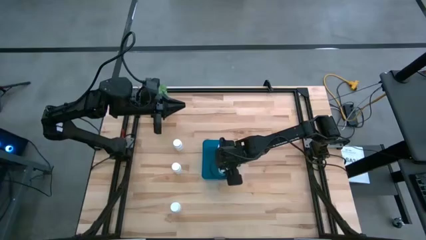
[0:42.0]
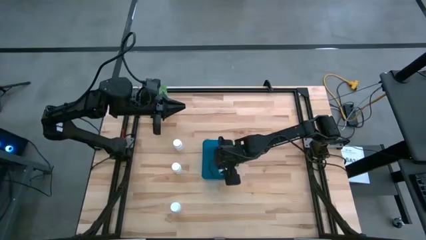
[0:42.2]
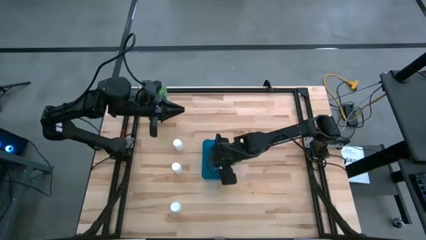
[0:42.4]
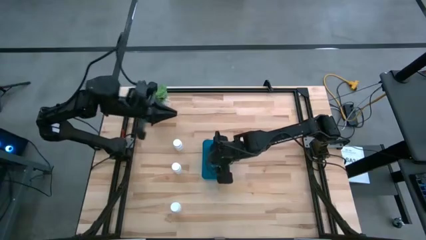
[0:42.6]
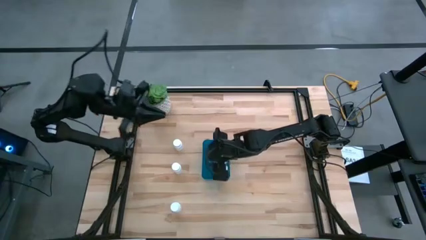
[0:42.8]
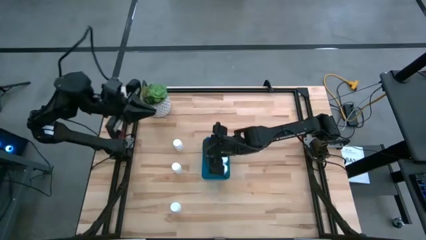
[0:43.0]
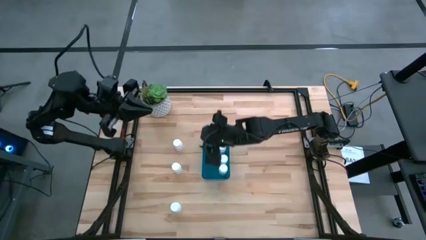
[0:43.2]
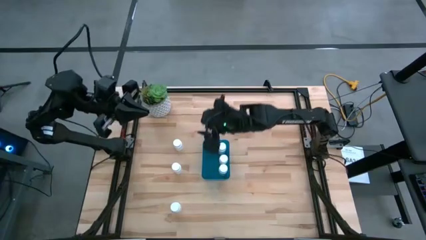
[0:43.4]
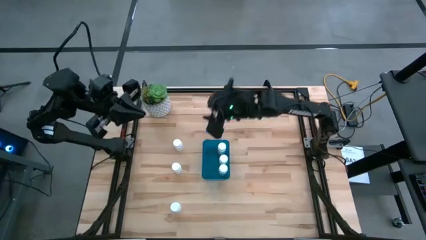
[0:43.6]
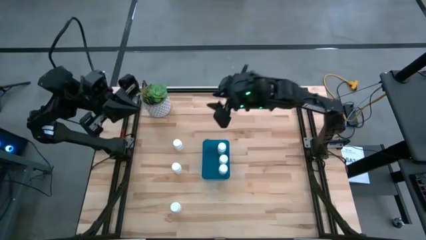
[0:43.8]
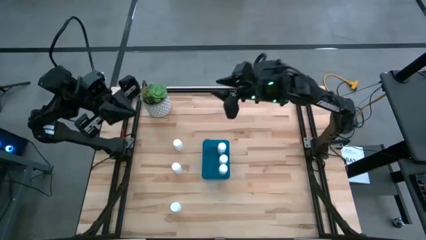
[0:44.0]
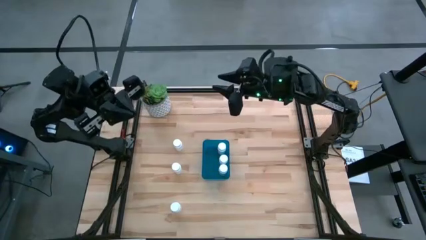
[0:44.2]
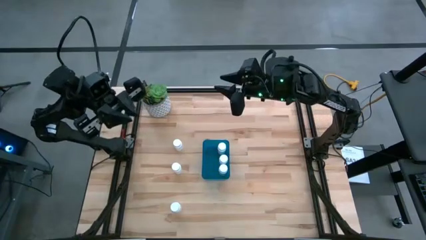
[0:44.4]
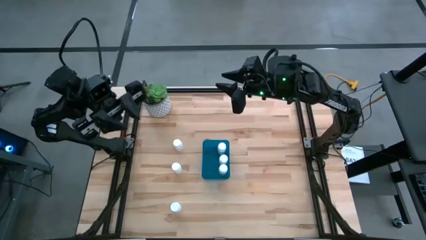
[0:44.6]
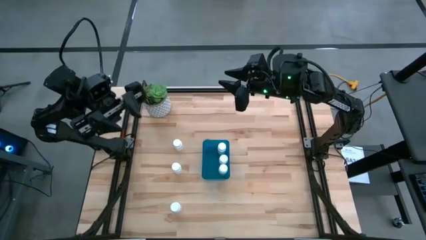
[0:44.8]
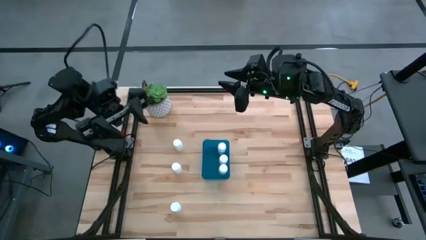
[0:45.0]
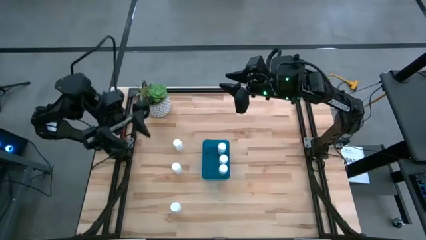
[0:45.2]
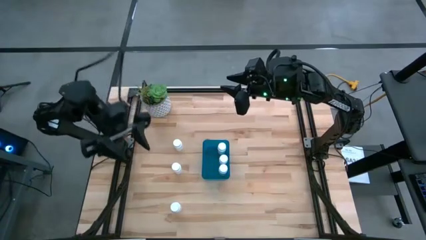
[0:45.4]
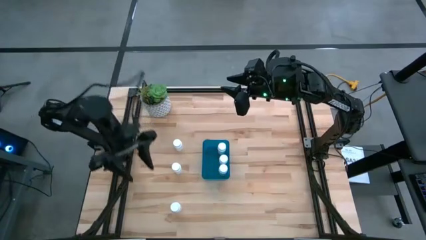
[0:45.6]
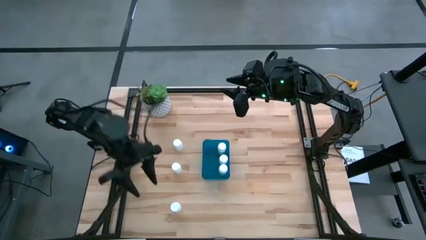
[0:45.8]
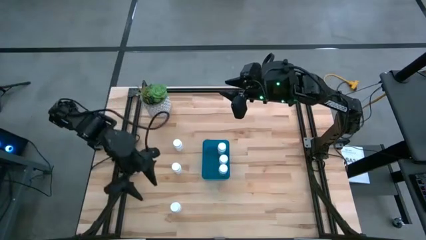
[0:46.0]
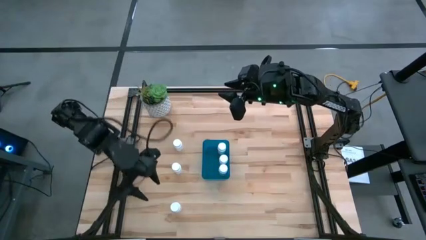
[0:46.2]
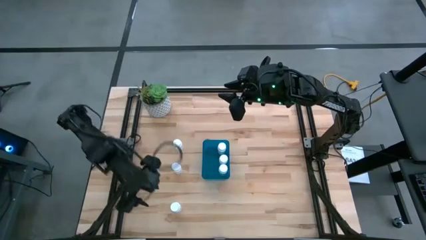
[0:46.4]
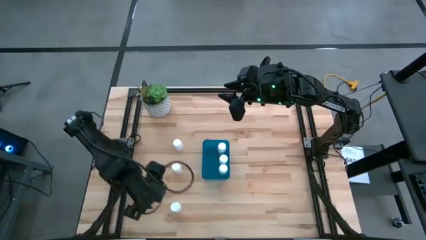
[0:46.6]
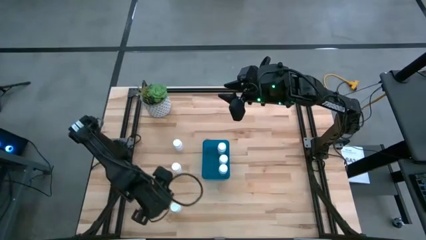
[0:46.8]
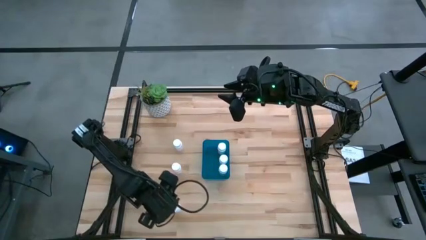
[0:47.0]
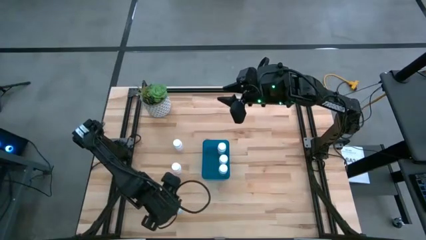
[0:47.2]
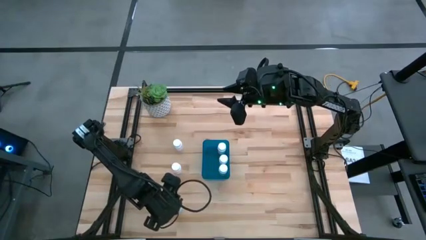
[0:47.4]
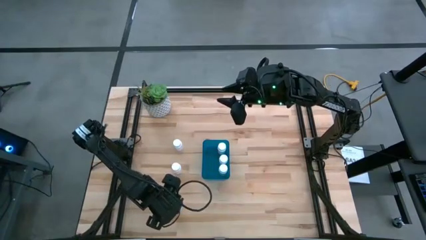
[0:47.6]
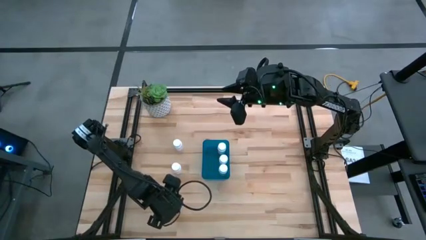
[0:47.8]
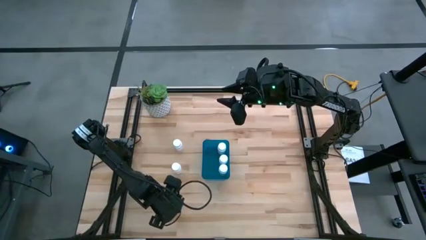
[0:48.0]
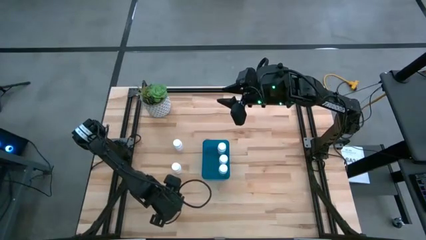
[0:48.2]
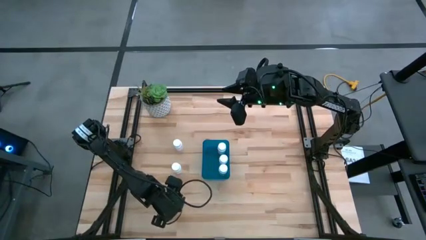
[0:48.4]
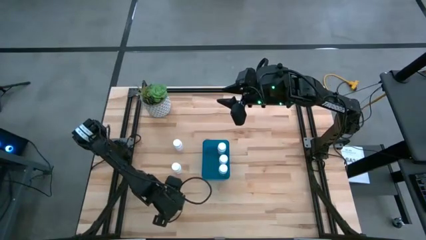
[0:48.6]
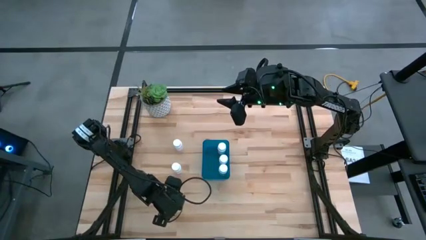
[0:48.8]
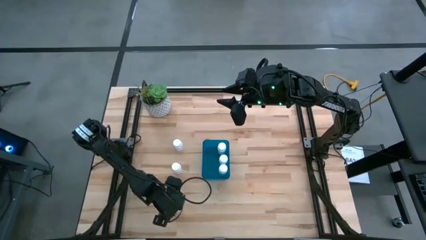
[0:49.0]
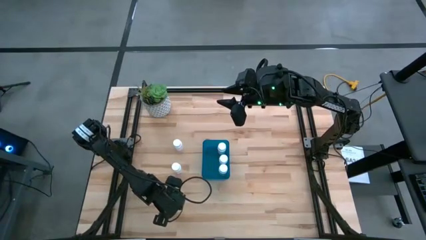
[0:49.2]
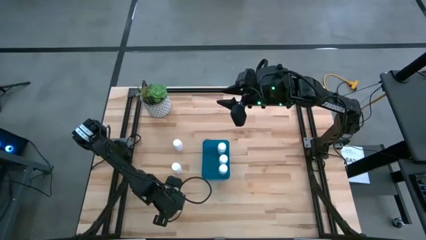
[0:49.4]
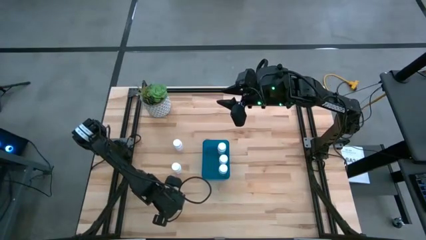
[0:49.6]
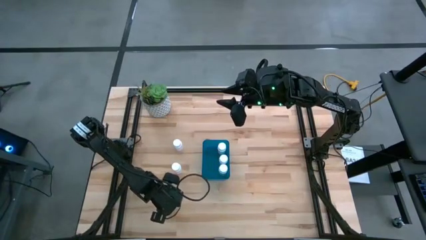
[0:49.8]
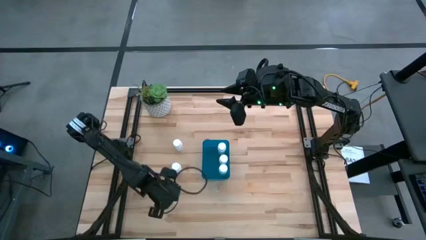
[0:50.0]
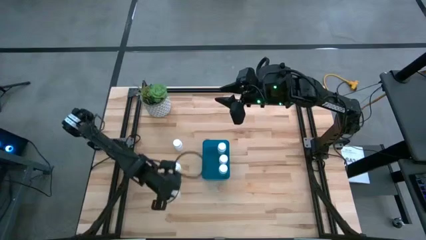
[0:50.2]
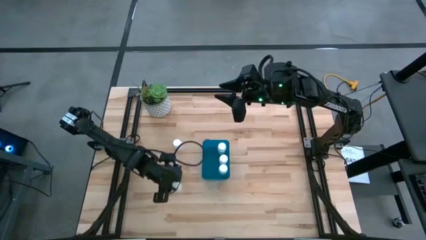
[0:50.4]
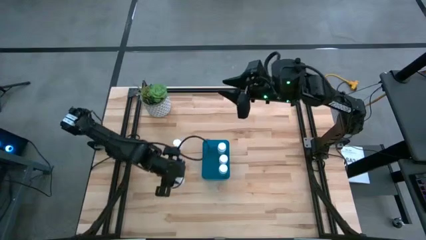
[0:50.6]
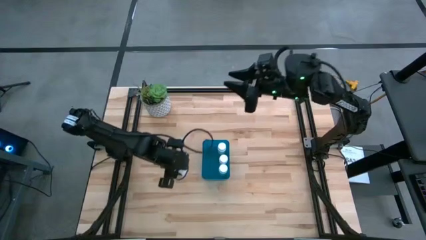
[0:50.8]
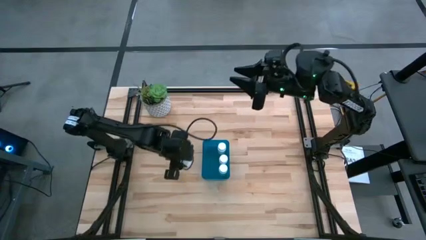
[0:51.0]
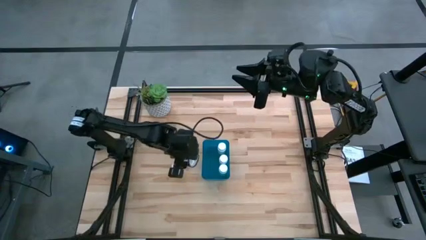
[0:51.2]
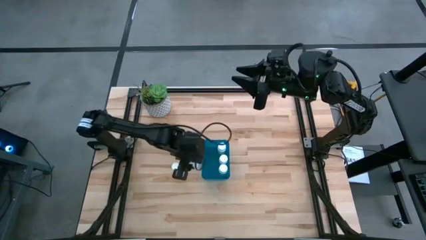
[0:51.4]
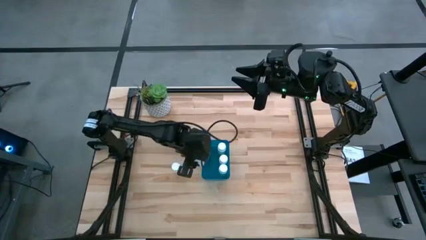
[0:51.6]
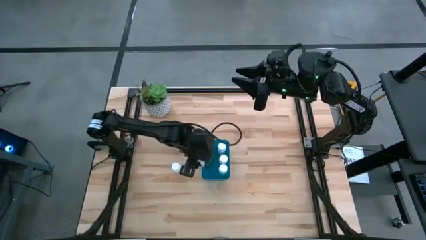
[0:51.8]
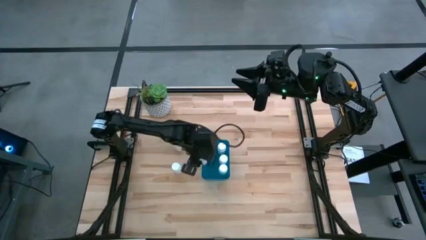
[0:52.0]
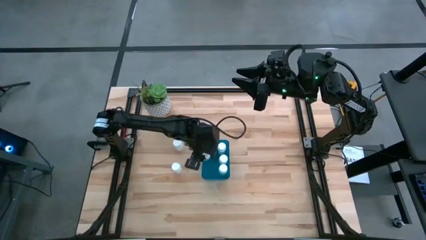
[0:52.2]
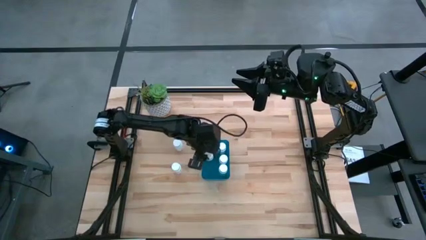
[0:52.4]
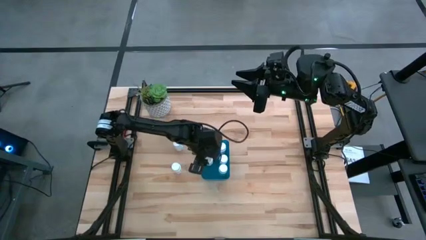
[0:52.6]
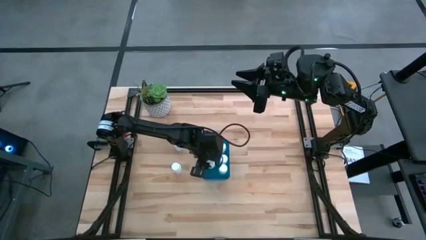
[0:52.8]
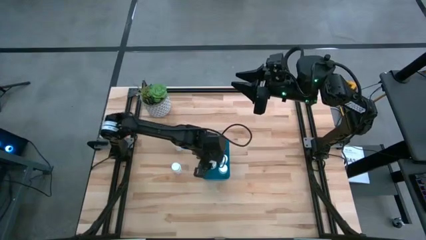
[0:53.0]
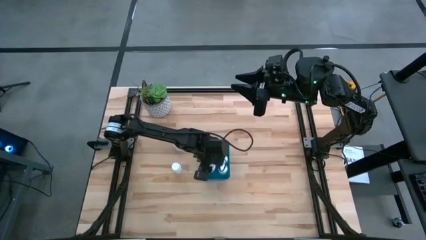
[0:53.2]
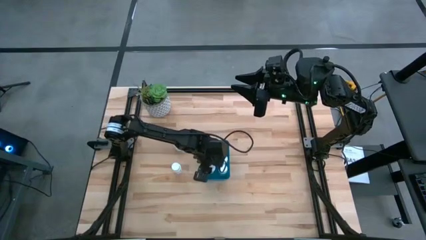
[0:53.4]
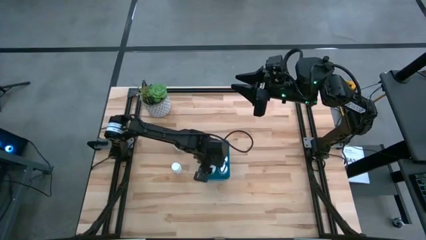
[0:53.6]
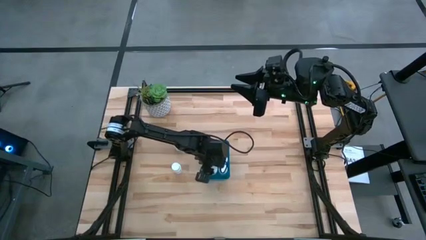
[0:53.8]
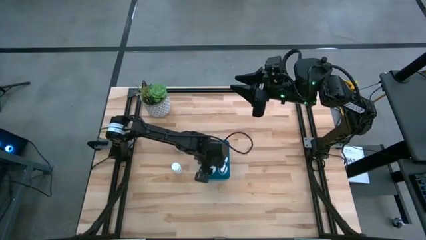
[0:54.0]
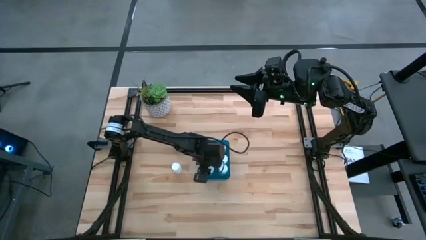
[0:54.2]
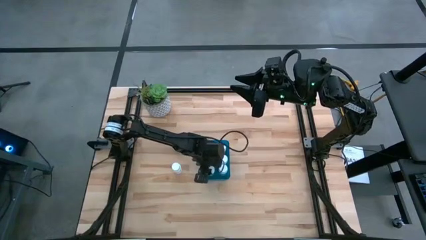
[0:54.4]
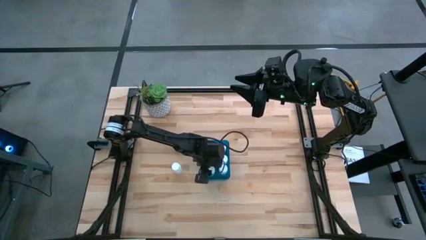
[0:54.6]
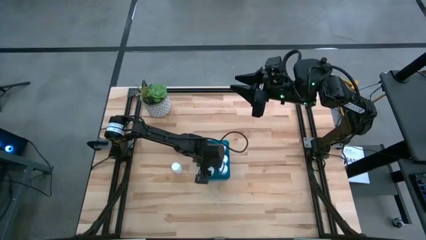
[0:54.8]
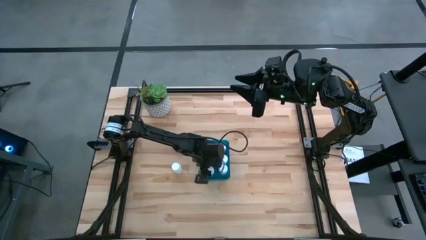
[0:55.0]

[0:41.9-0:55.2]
Task: Pick and place pill bottles into a basket
Put the white medicine bottle into the blue bin

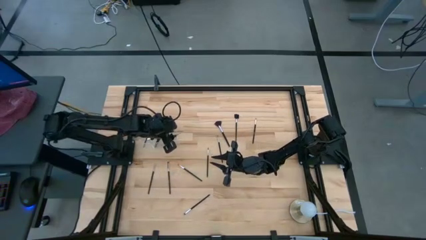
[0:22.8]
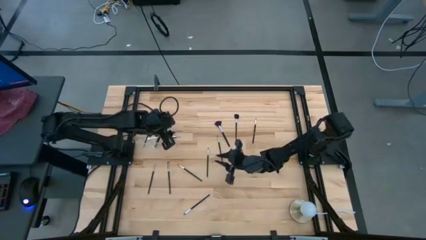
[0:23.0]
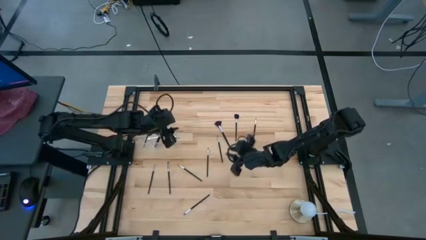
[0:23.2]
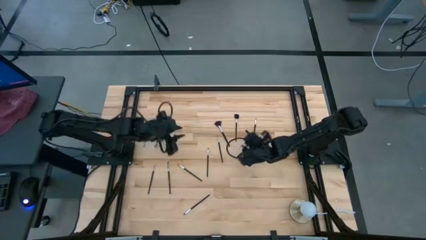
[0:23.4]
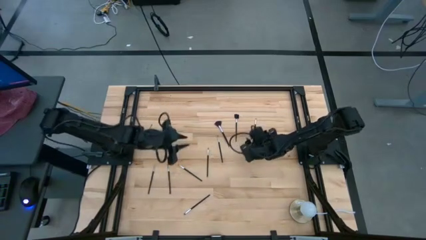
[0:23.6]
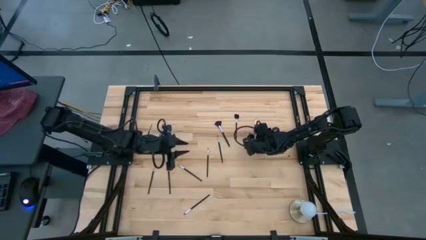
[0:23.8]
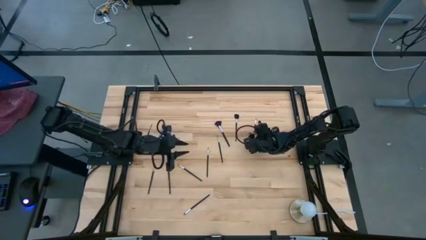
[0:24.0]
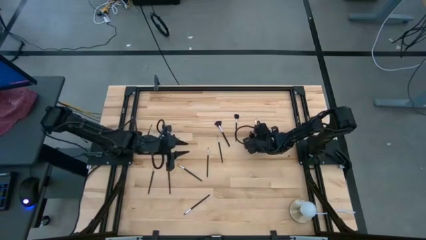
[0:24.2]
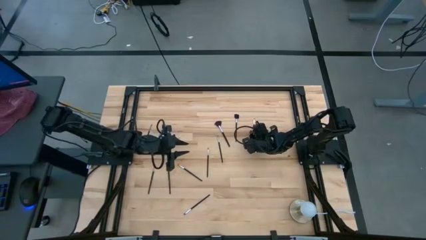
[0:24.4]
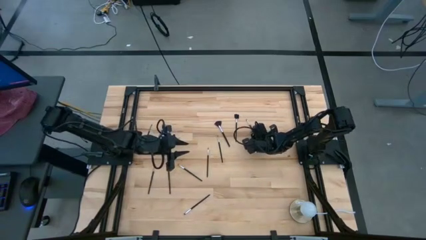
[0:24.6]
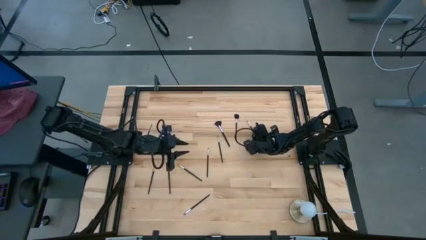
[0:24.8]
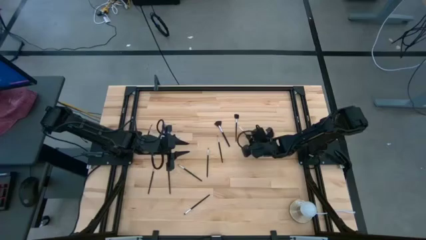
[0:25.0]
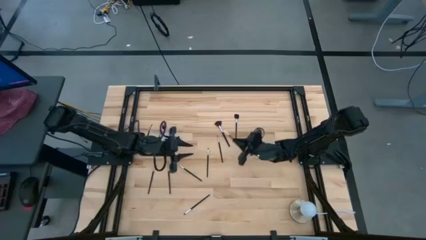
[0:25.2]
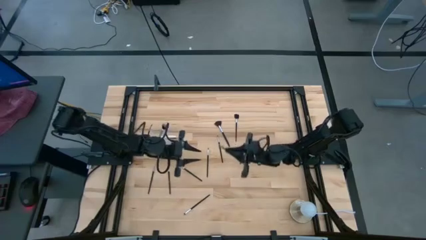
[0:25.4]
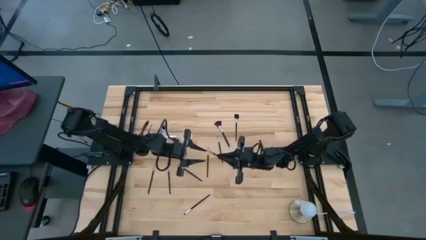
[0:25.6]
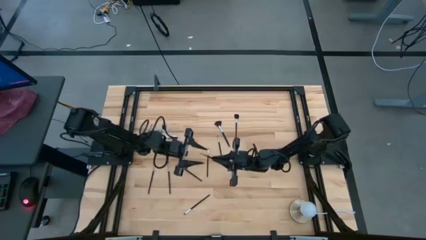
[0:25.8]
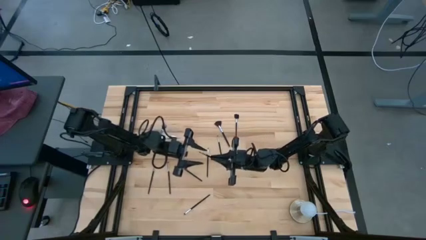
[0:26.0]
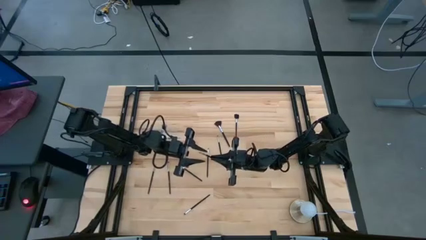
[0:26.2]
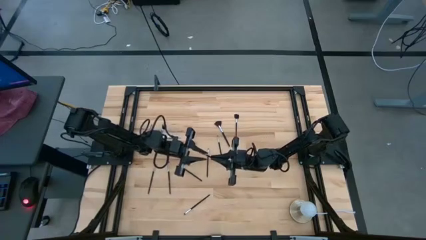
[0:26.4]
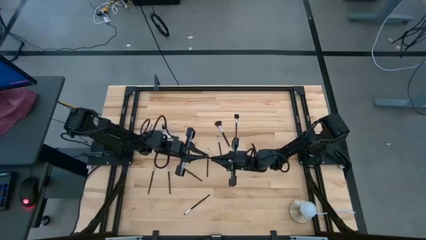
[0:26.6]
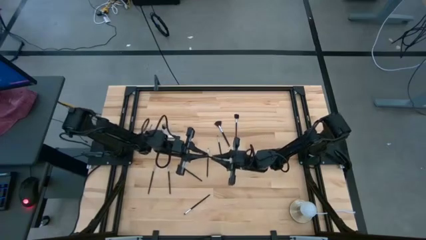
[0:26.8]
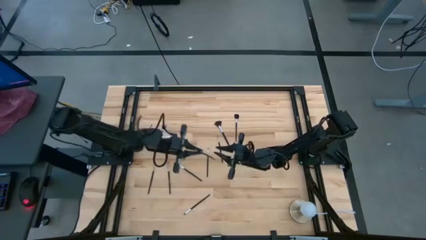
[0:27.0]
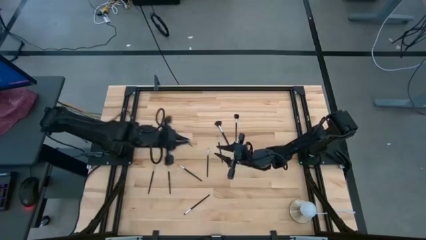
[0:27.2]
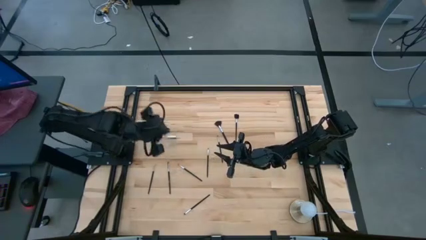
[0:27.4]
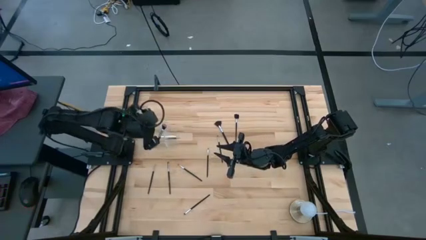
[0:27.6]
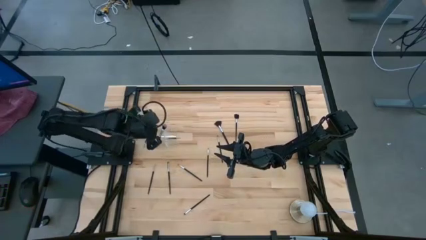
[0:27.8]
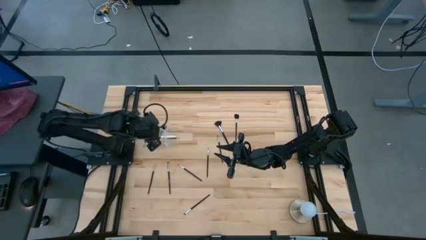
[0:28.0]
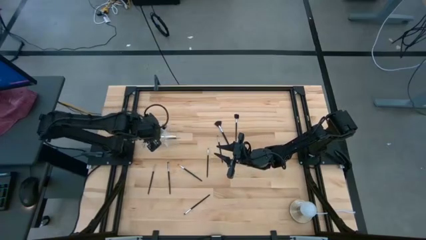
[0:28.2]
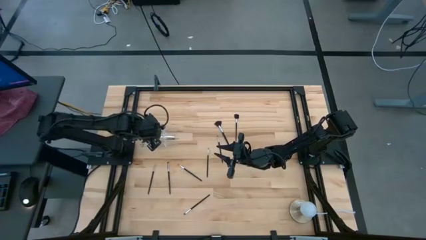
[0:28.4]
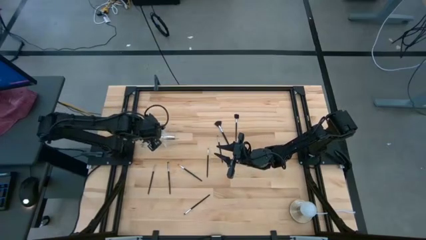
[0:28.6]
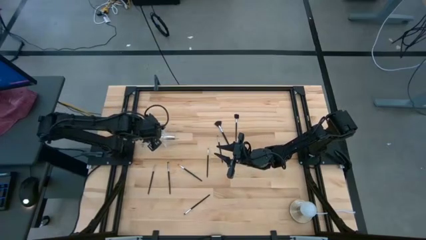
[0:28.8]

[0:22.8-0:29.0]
Task: Put items in baskets/containers
Put the black eyeshadow brush into the transparent organizer
